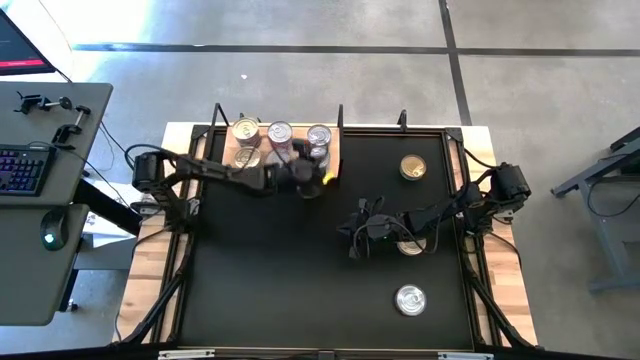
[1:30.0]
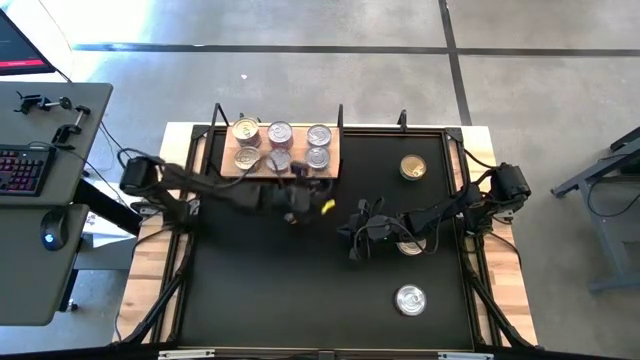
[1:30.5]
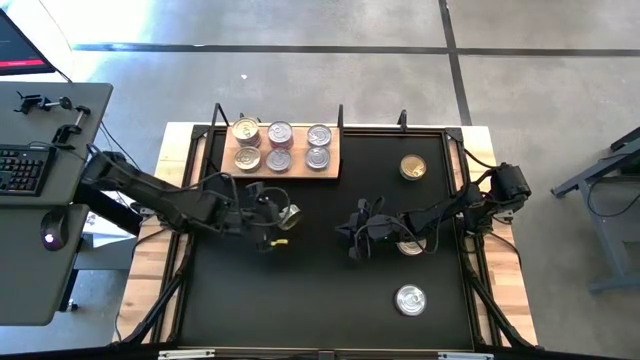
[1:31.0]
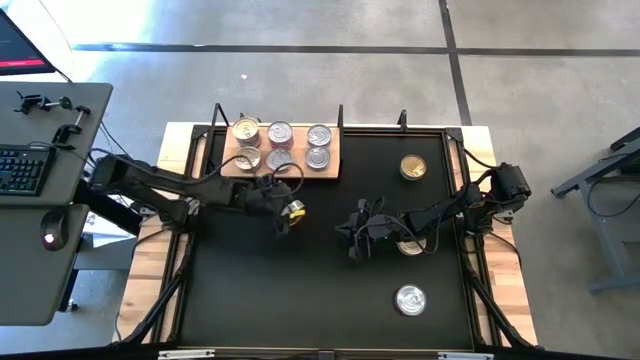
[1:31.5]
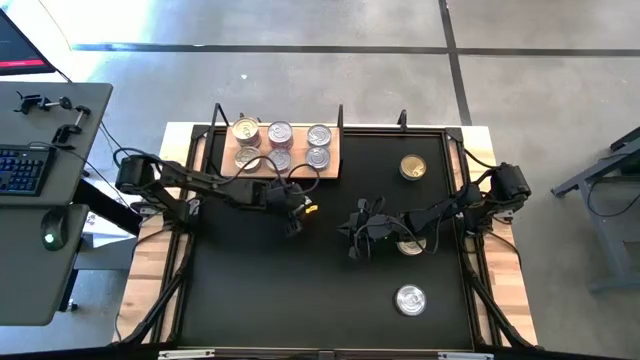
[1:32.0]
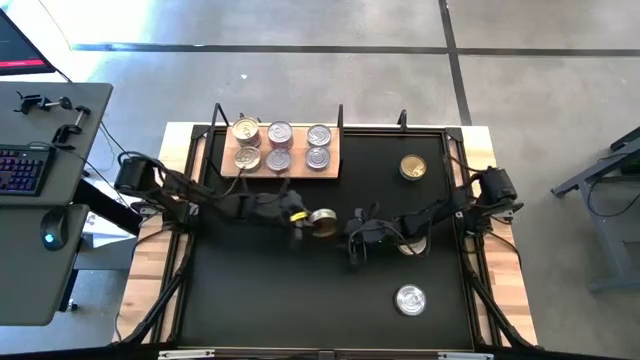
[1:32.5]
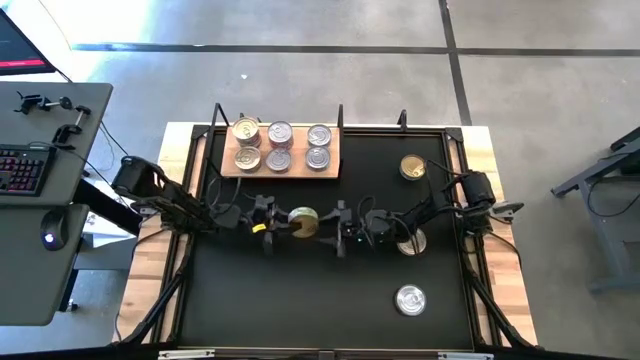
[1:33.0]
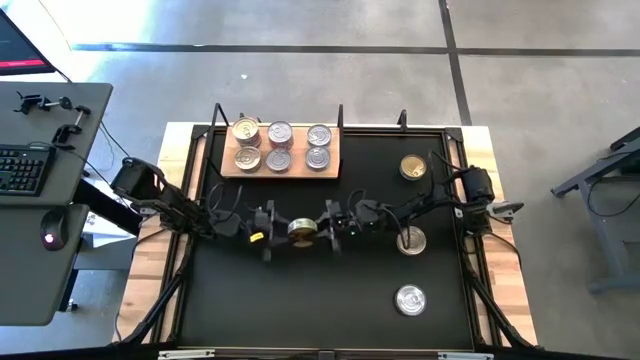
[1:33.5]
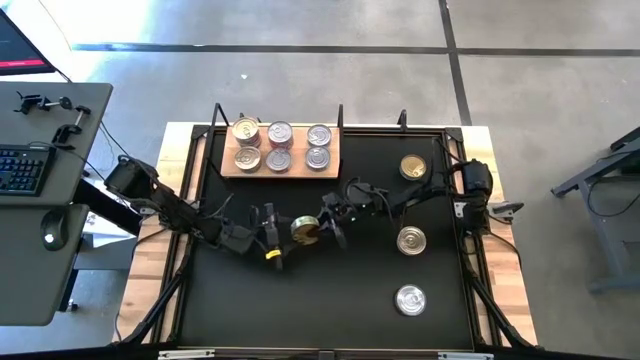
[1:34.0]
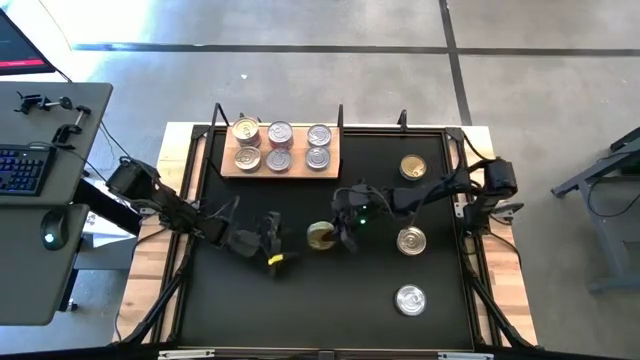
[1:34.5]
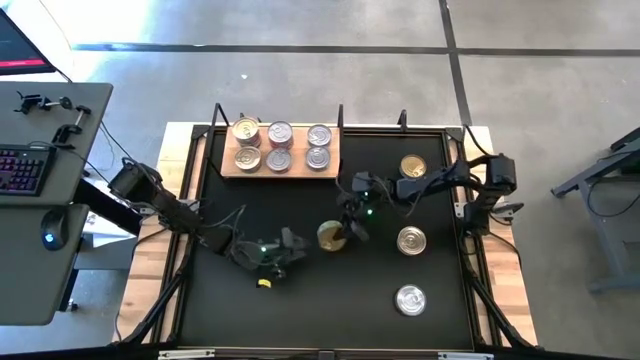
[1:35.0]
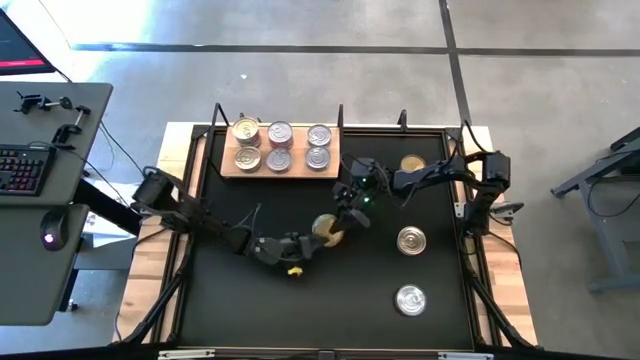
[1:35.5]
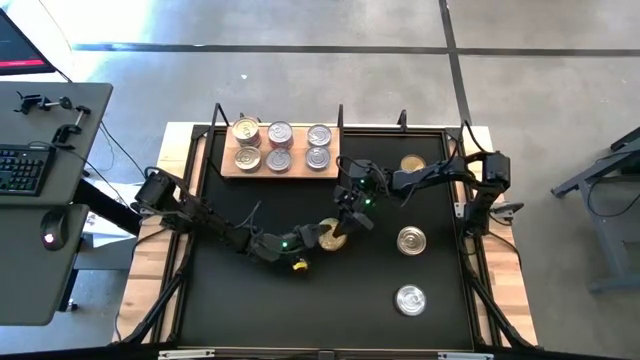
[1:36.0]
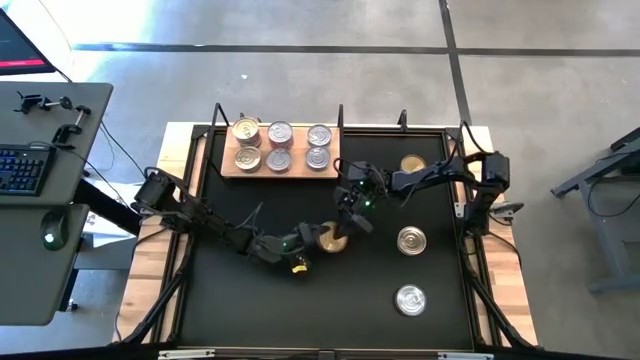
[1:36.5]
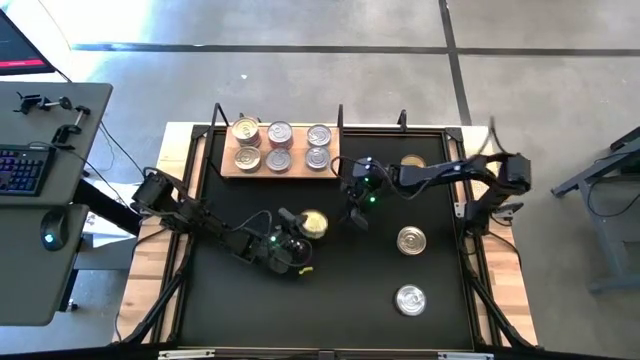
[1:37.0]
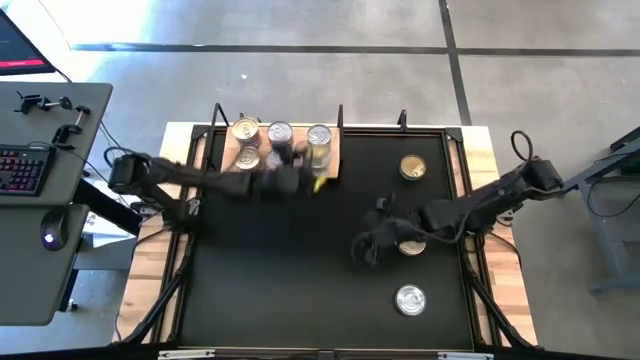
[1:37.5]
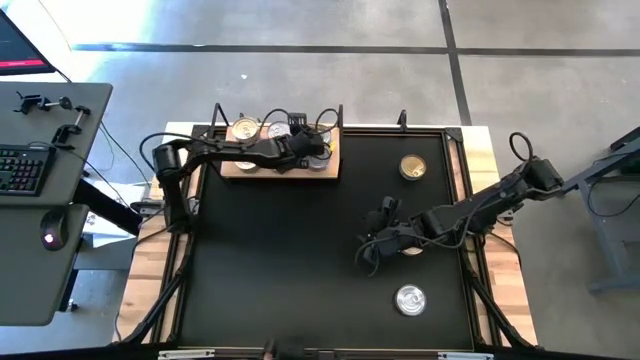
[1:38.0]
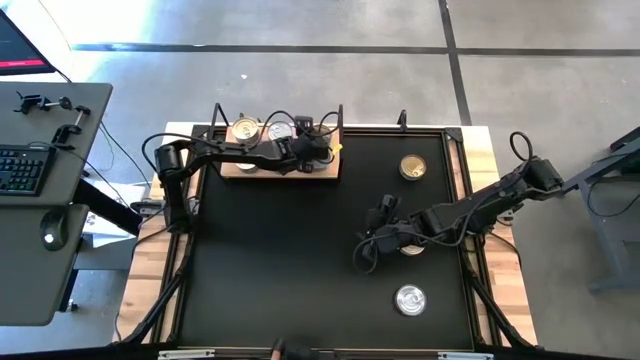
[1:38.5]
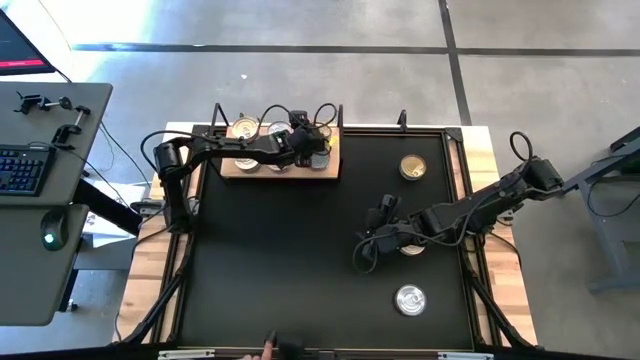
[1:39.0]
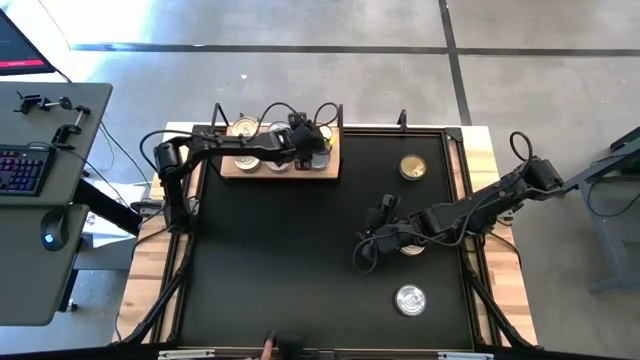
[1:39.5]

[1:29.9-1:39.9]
Task: Stack canned seafood by type on shelf
Stack the green tuna can on top of the green tuna can on the shelf

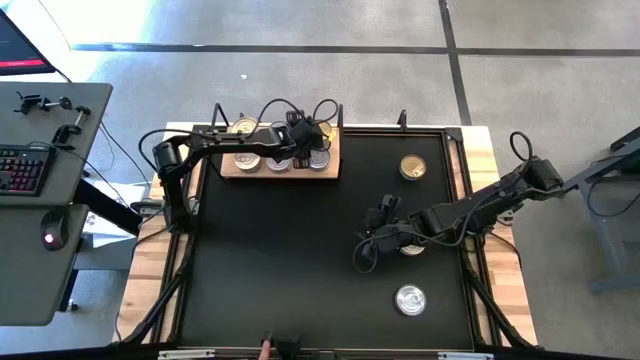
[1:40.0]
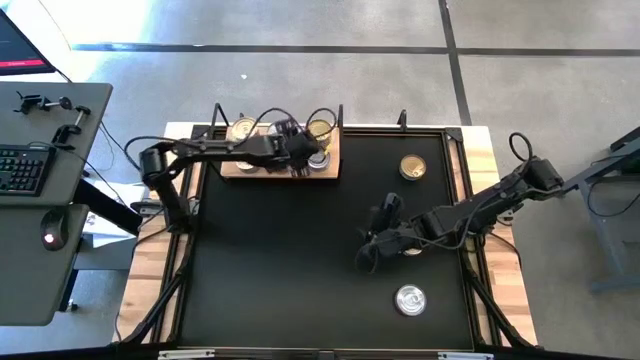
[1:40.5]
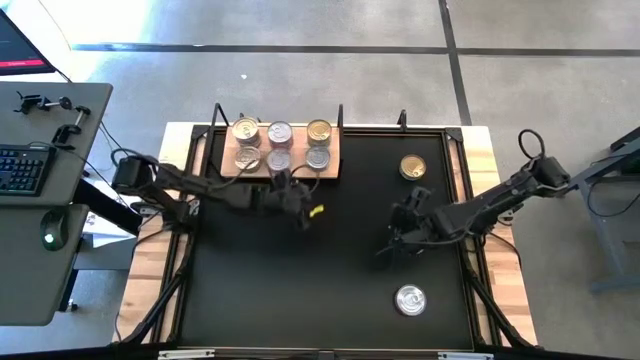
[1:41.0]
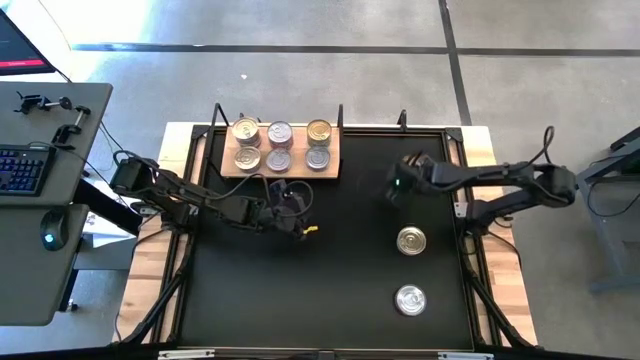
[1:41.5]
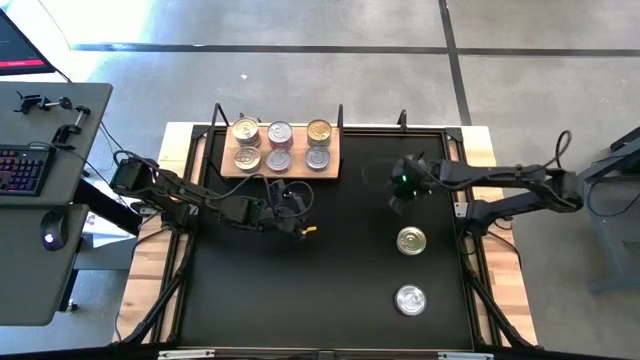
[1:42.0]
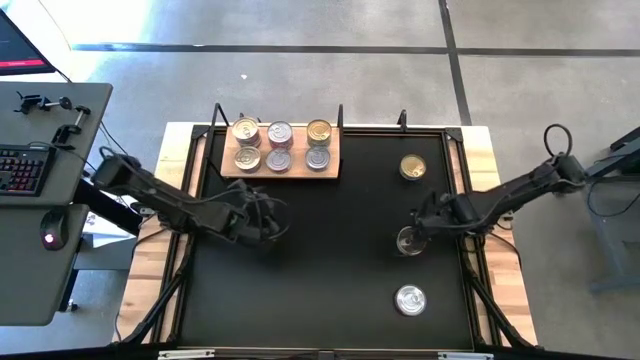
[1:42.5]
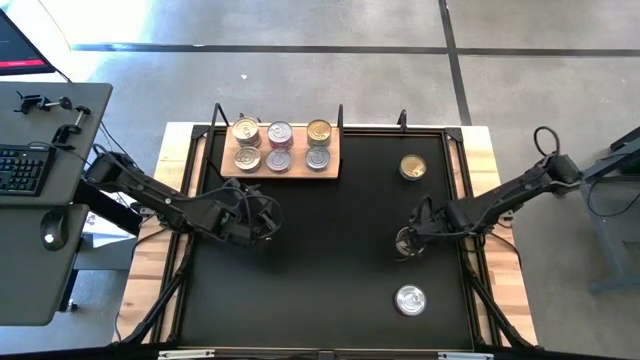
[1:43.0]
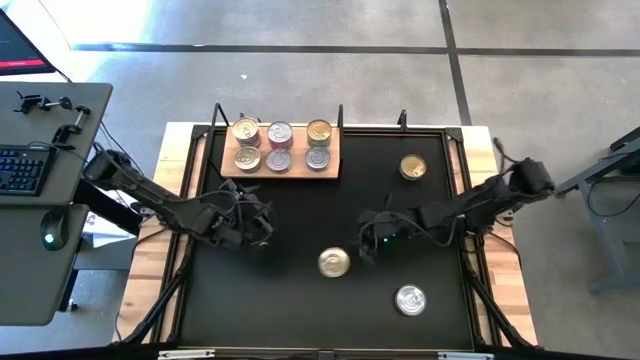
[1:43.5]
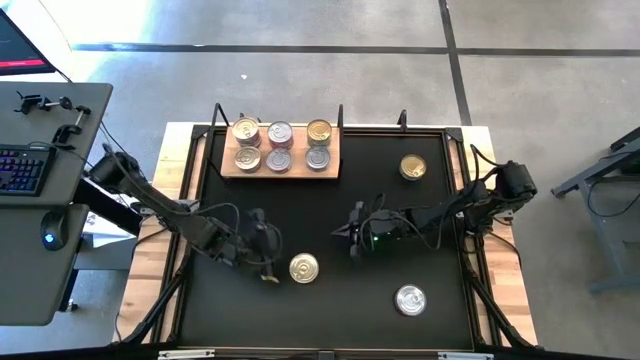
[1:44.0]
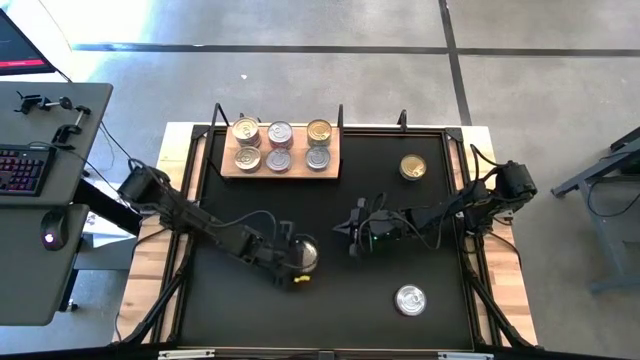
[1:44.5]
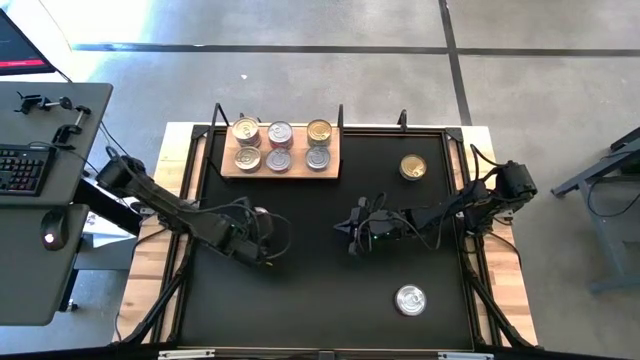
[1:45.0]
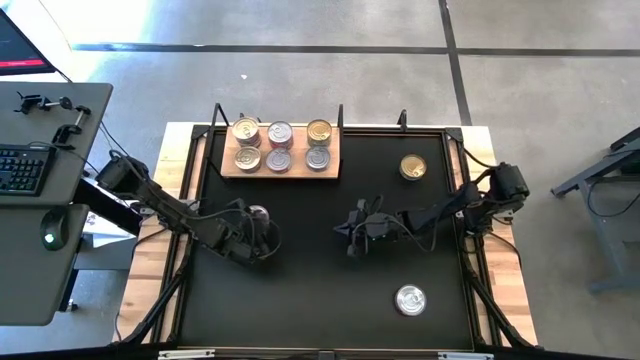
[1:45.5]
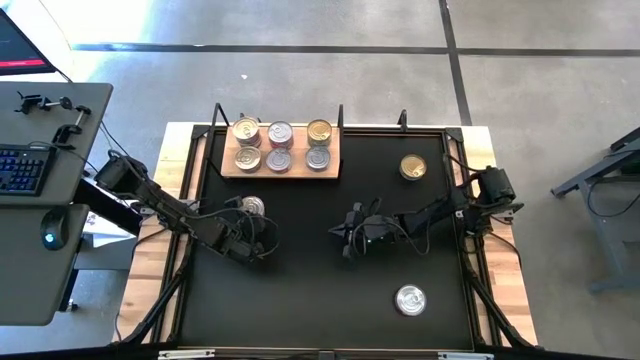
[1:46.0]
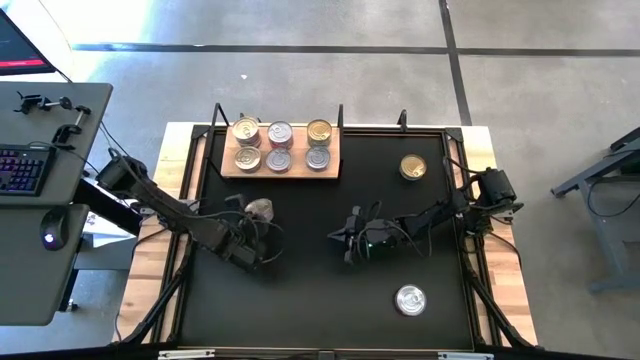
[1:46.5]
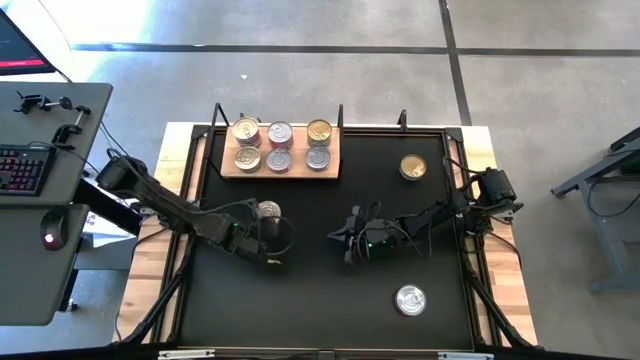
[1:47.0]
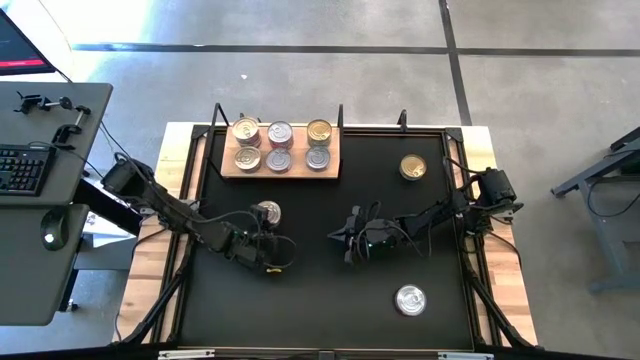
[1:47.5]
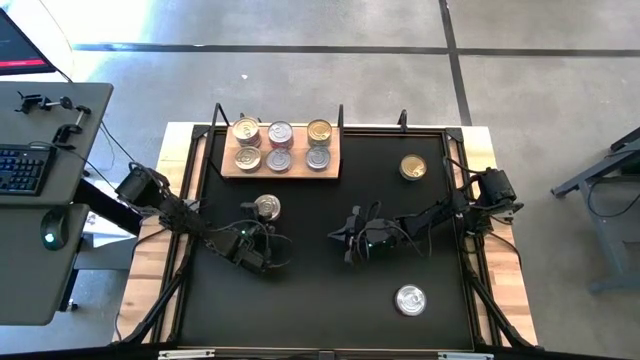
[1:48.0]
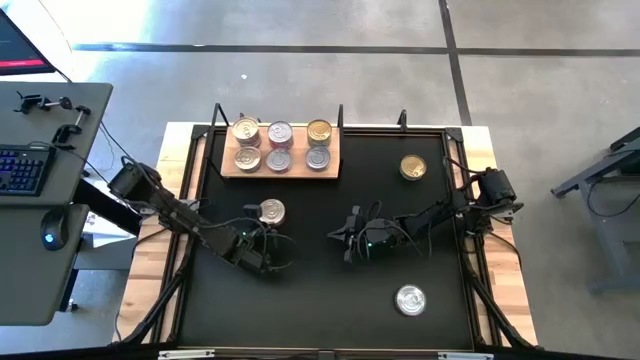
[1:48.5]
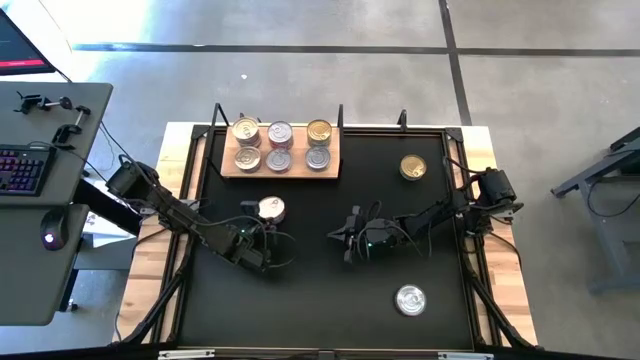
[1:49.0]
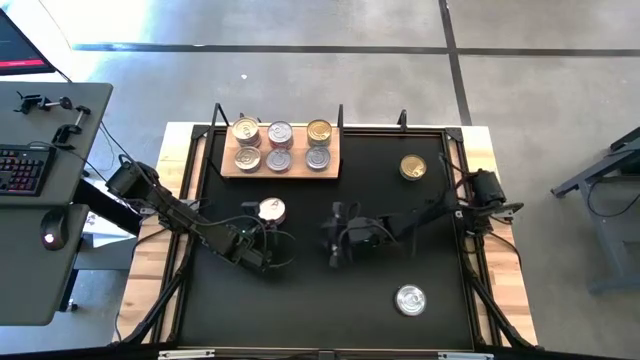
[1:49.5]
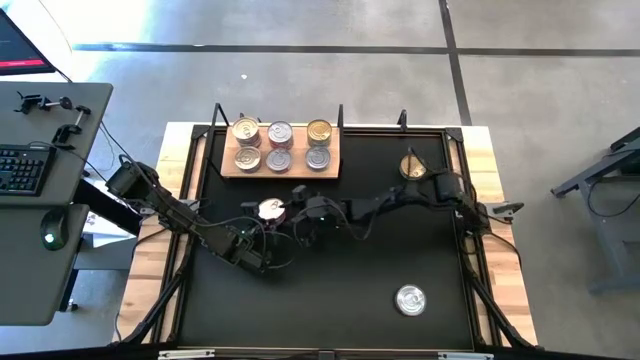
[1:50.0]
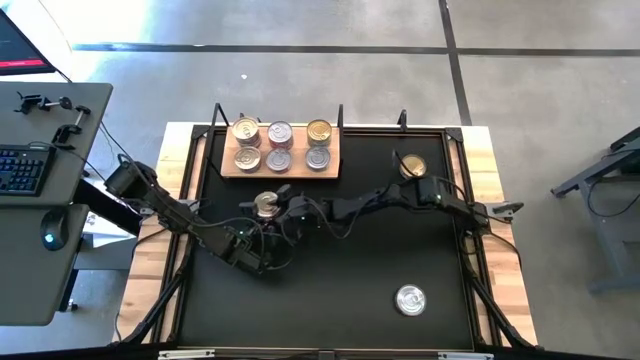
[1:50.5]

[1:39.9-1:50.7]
Stack the blue tuna can on top of the blue tuna can on the shelf
